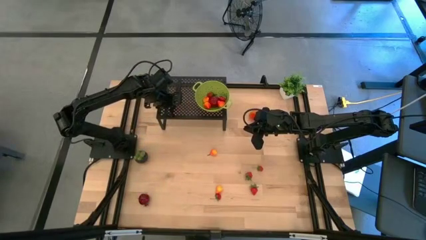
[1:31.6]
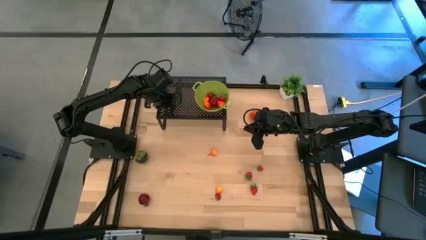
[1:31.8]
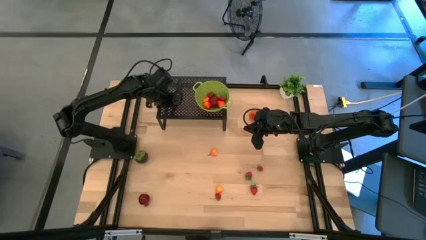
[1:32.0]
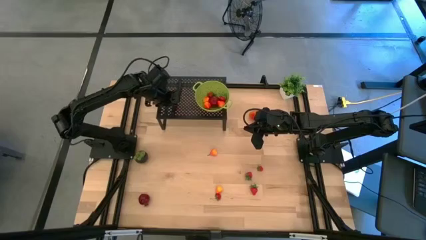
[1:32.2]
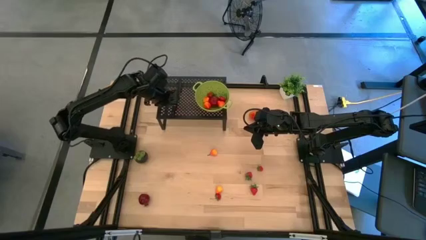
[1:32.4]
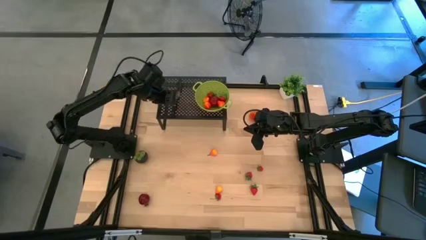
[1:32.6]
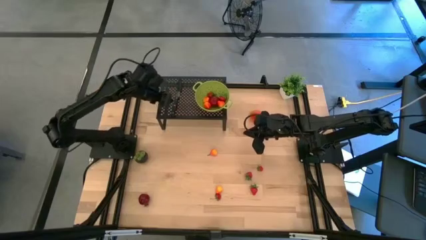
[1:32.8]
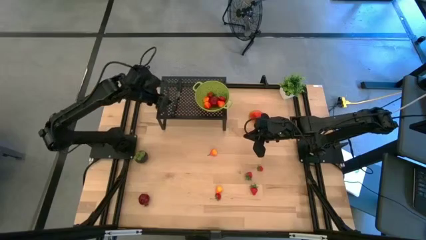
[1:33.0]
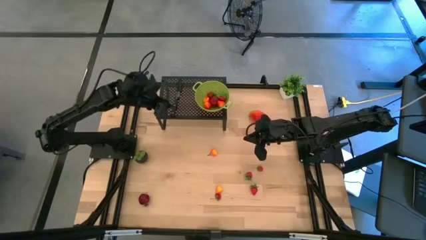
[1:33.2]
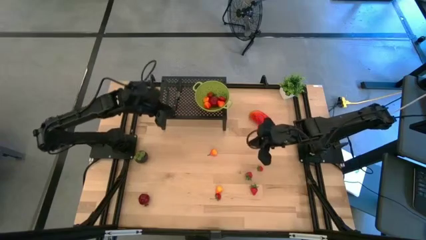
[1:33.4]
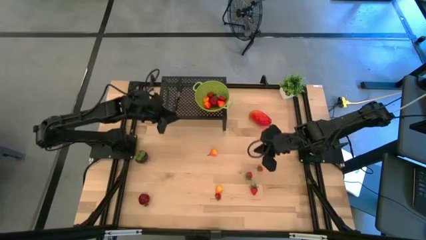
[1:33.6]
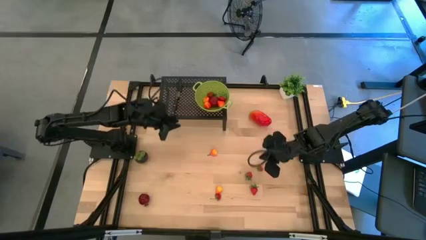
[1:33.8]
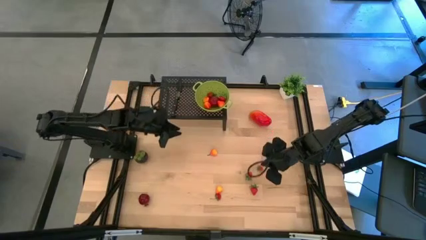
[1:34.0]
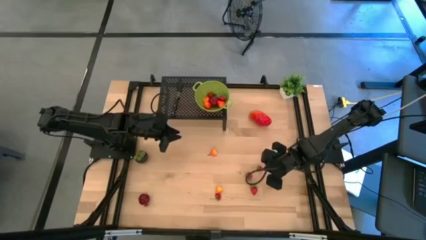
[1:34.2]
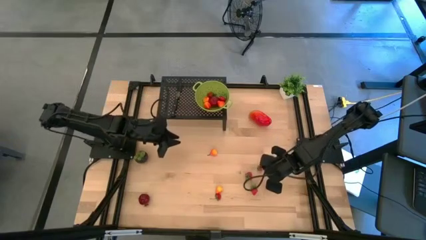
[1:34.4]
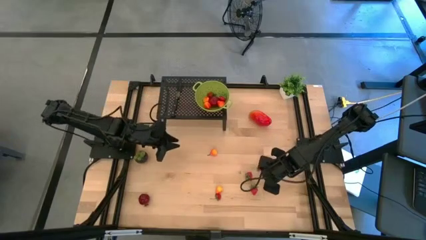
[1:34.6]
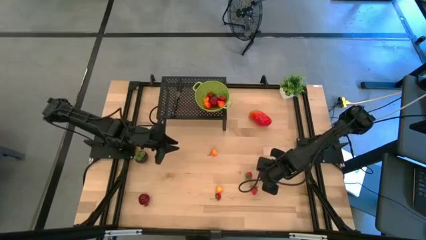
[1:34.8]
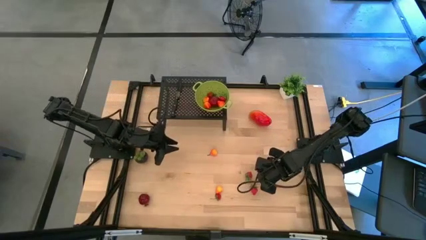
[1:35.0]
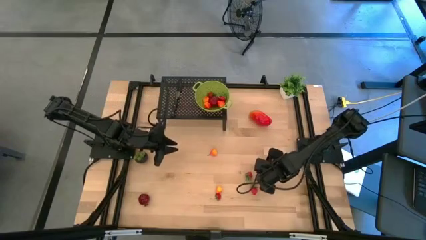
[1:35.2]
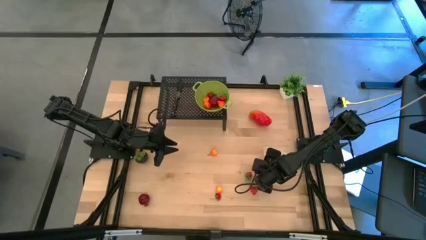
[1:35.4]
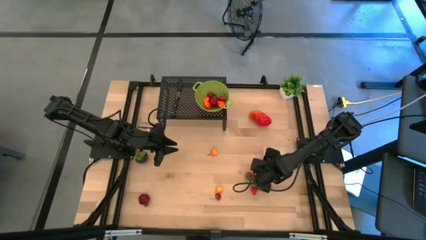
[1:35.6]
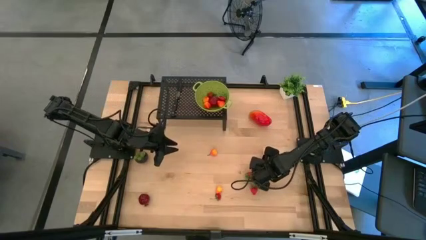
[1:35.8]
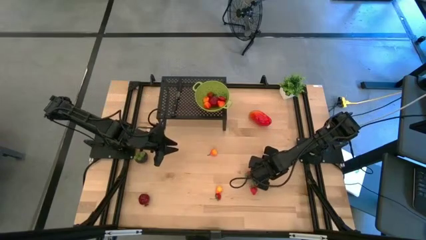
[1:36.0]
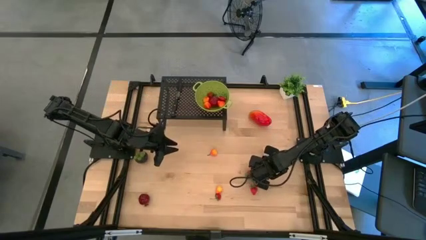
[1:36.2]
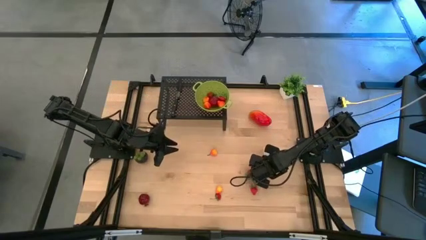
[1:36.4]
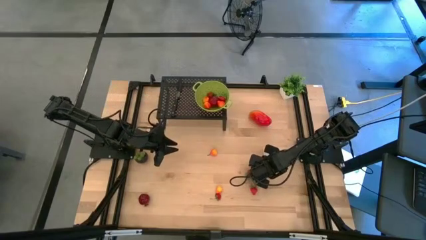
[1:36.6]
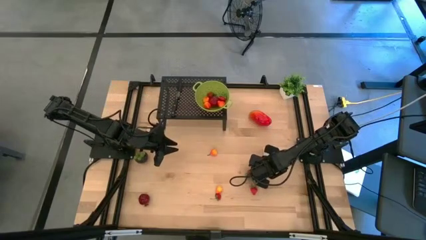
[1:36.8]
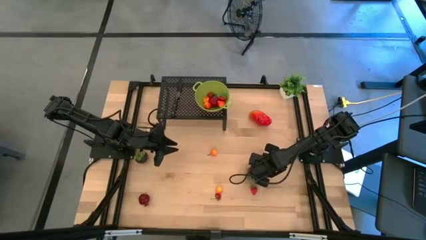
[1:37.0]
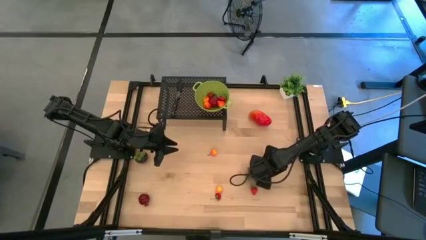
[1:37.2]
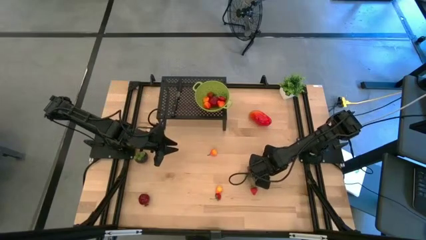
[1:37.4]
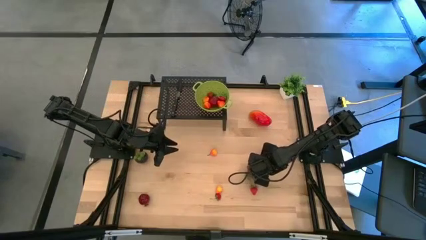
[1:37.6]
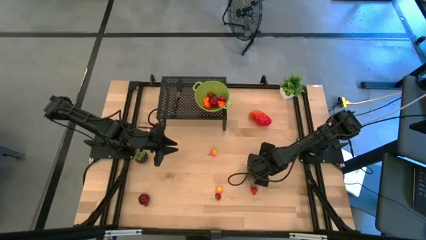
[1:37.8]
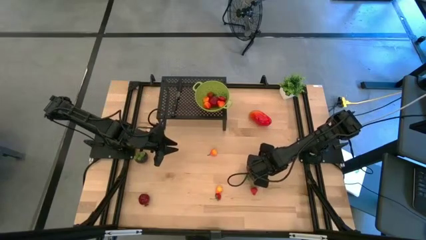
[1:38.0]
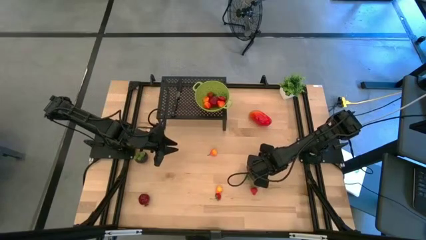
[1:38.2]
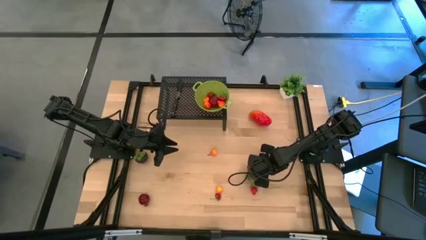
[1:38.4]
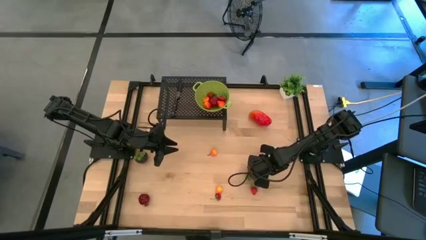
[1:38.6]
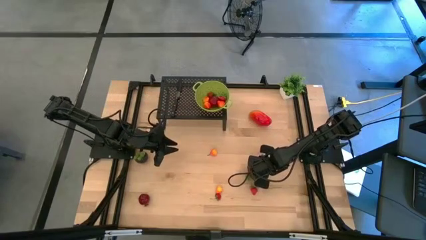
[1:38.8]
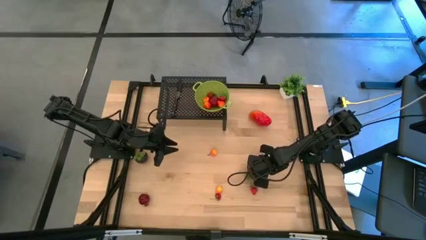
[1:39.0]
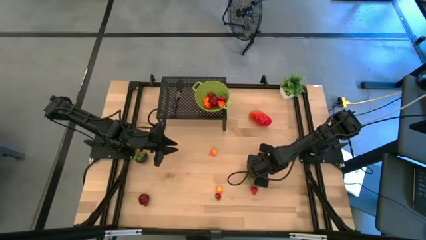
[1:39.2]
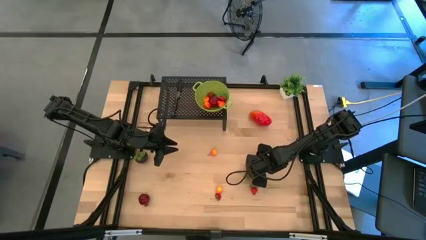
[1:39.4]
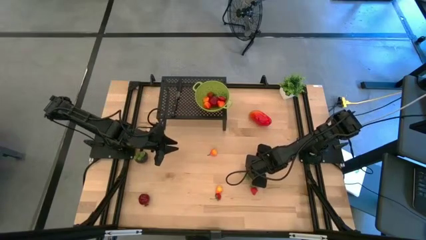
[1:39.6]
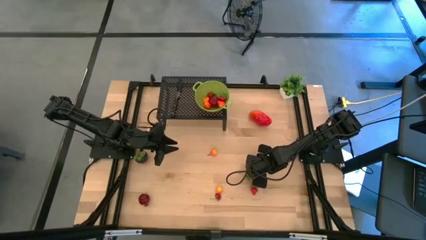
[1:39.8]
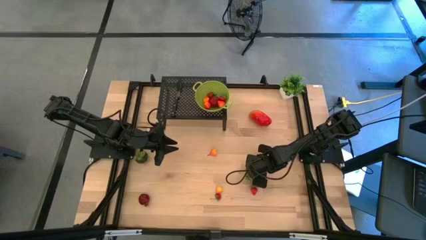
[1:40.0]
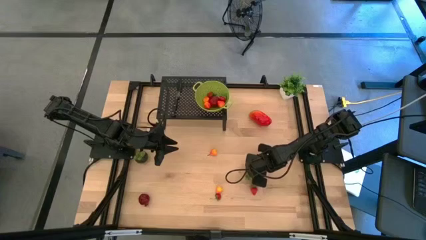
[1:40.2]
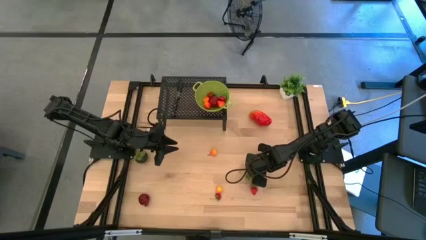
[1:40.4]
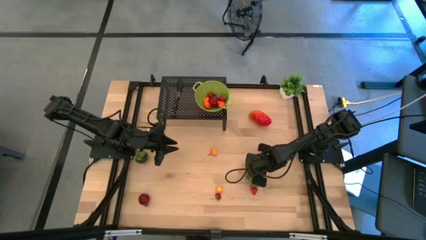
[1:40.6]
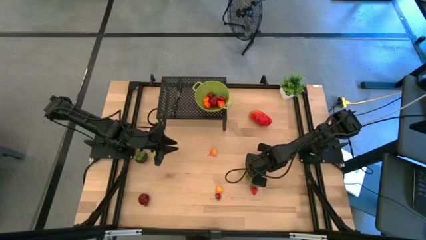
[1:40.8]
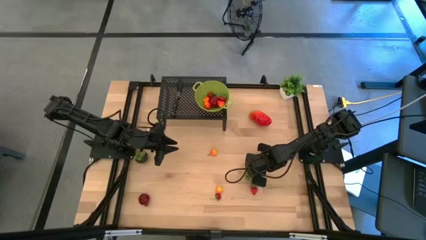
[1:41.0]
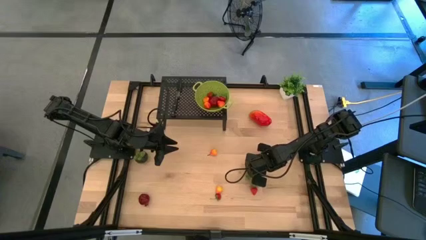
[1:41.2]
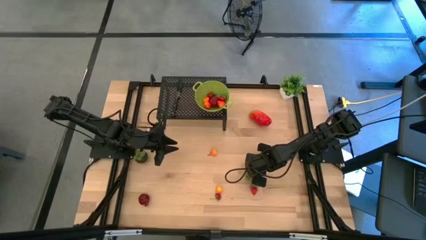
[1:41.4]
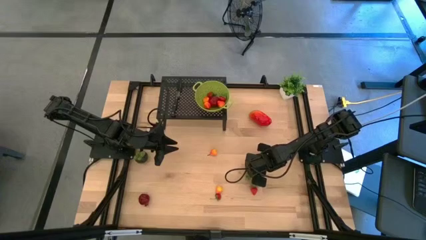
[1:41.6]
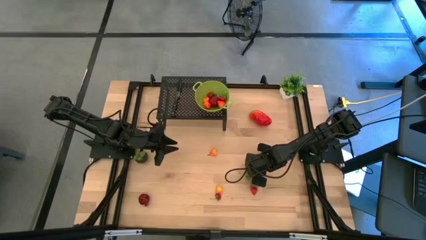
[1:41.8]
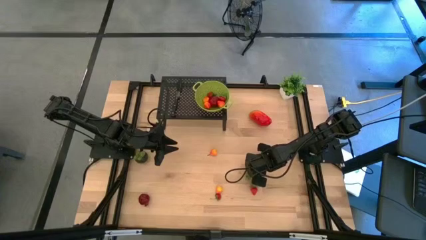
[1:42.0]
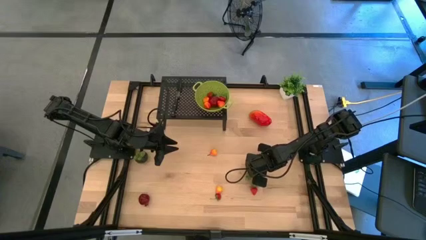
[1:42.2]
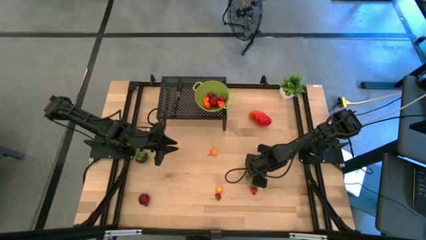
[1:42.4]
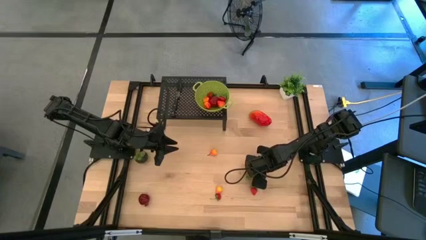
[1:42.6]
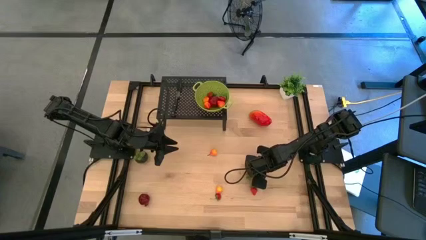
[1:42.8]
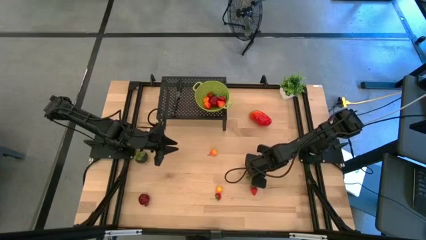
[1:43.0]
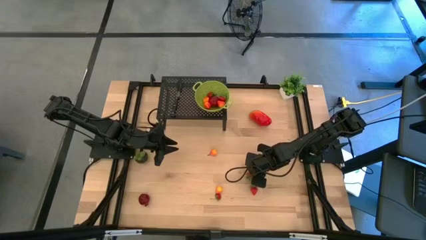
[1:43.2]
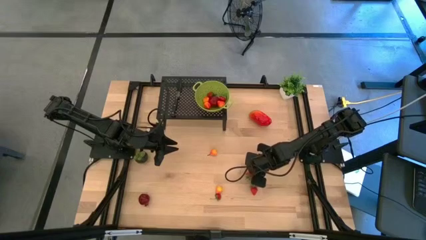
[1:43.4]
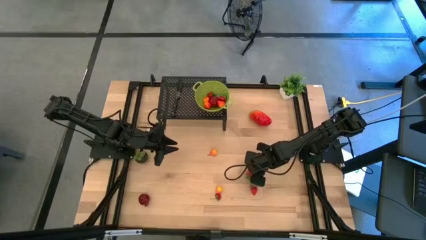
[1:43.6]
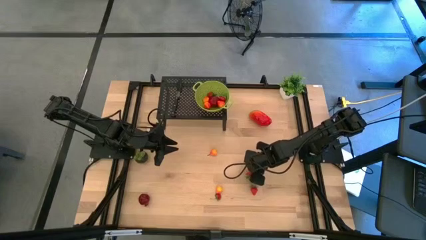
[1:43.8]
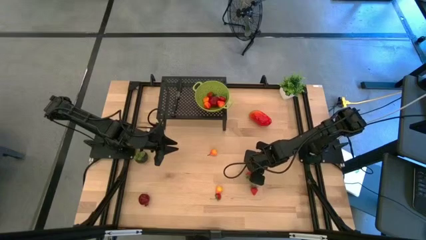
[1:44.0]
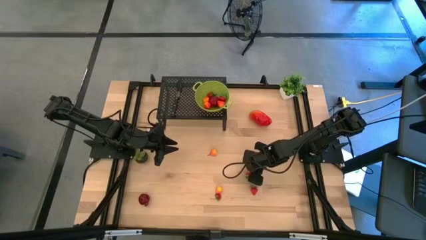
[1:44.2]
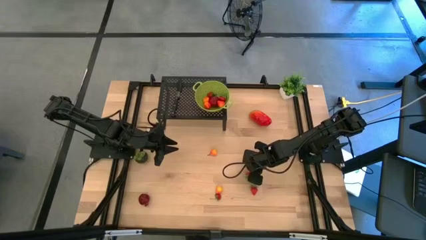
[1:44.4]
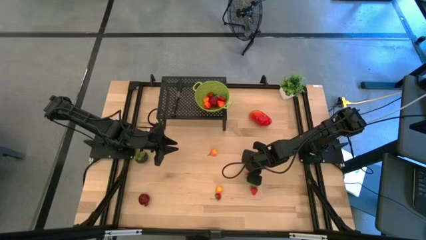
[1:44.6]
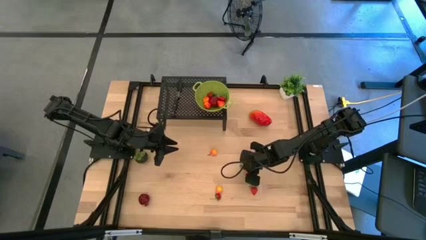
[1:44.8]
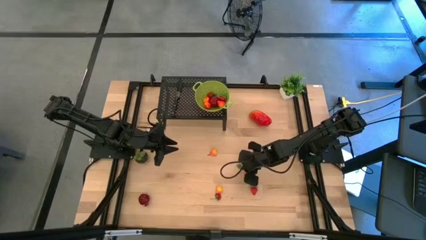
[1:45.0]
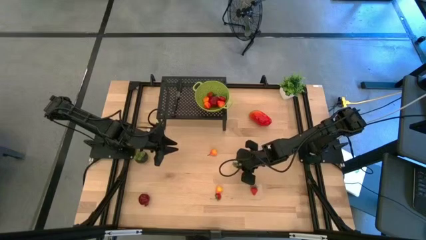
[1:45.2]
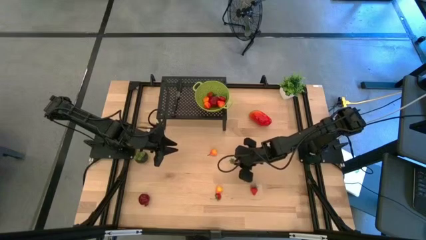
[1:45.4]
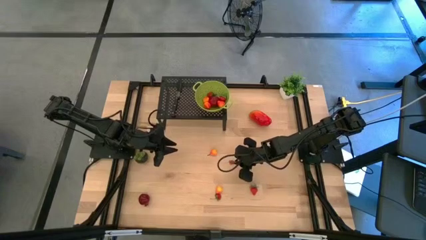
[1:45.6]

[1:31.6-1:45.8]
Task: Pick & Place Fruit
Put the strawberry into the green strainer bowl on the shelf

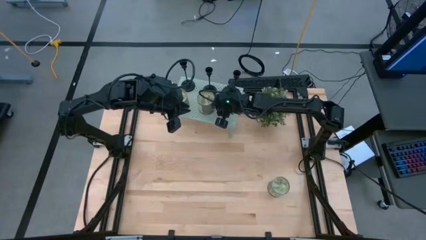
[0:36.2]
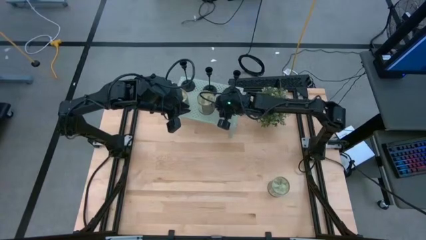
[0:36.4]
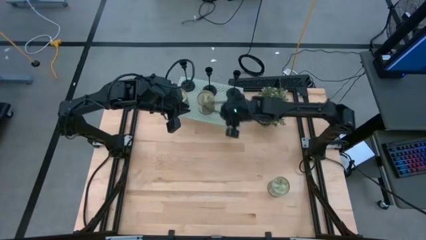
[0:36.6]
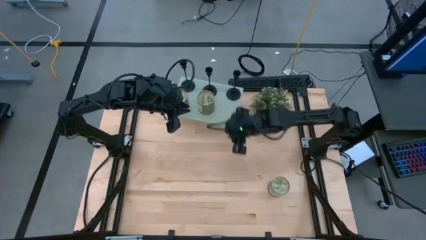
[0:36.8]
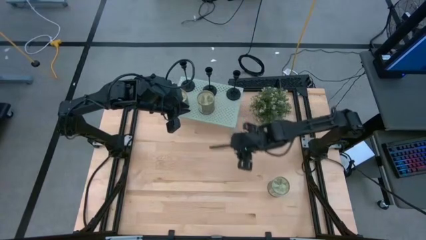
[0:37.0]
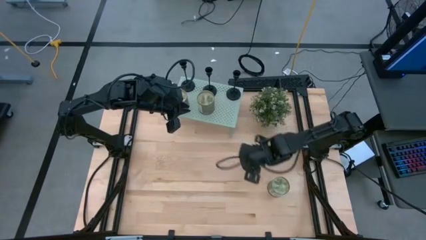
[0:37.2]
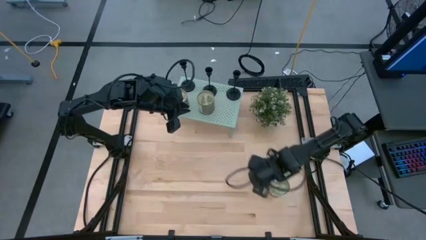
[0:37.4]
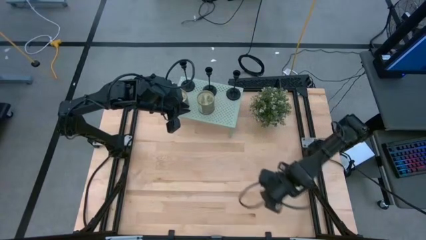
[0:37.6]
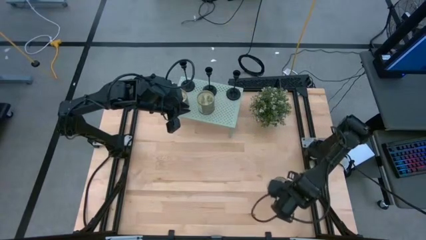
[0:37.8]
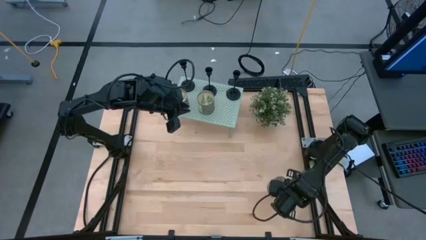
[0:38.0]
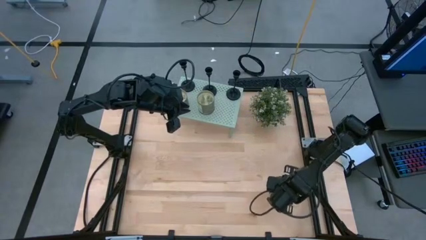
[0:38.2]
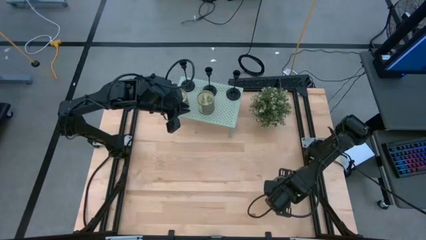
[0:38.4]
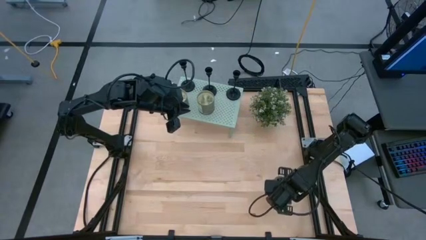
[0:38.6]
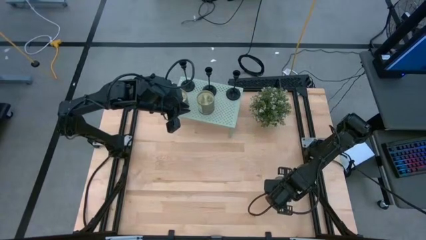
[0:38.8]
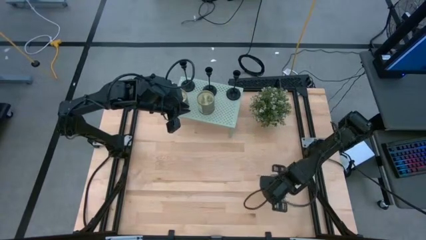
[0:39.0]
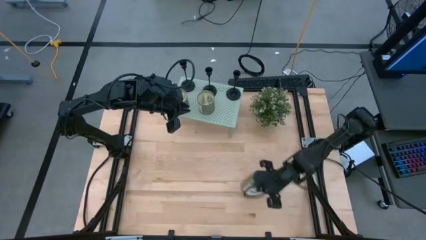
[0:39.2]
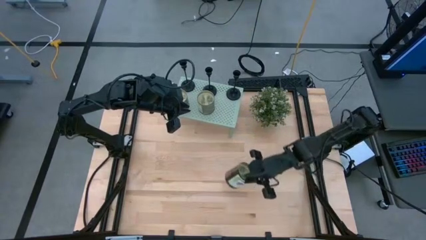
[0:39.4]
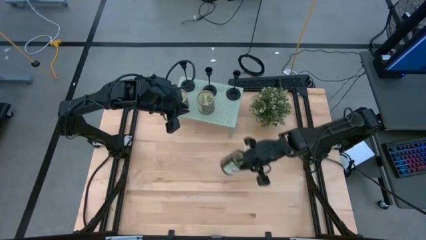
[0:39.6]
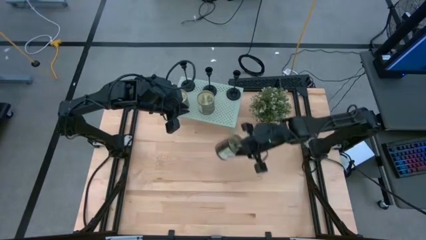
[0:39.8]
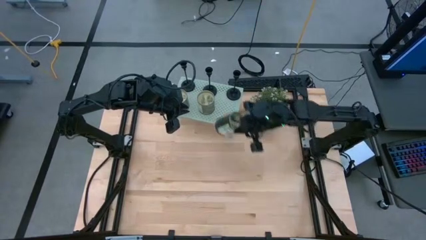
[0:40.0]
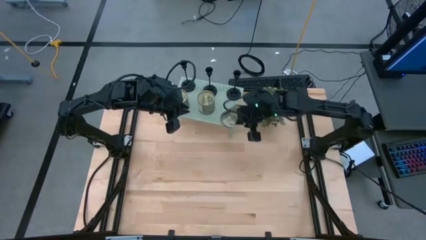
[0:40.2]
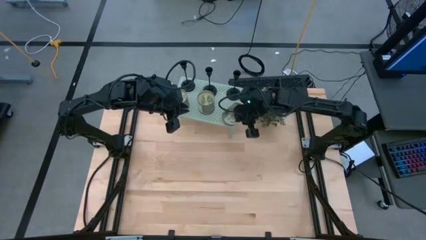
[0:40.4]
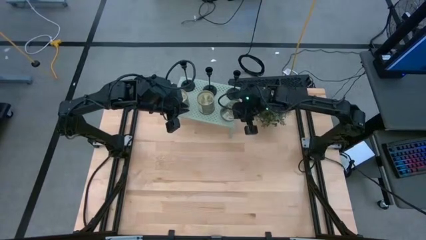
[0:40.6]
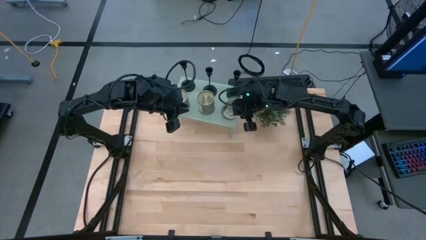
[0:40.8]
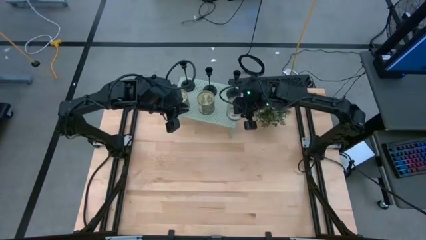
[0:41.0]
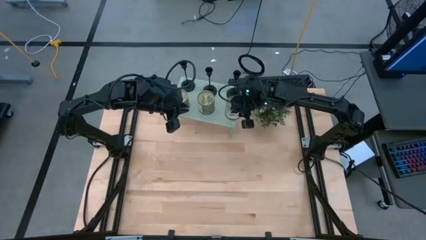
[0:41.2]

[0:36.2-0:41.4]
Task: Pick & Place candle stick holders
Put the yellow scented candle on the shelf
